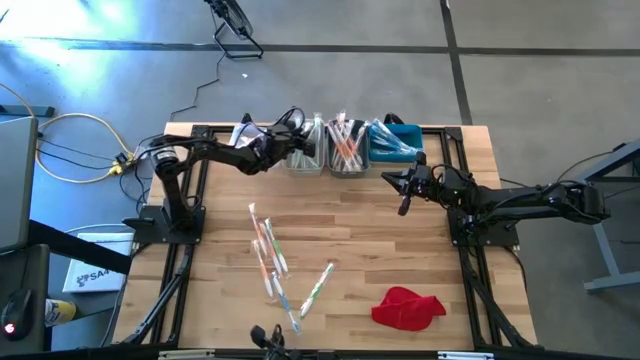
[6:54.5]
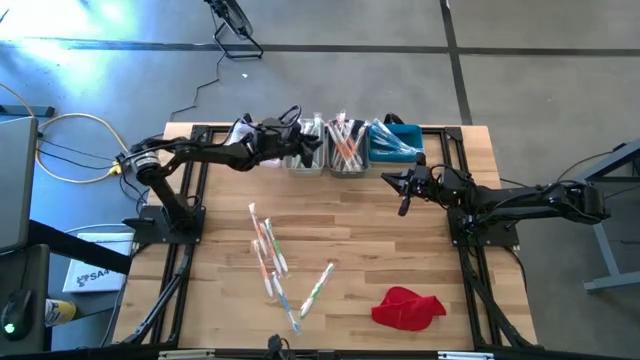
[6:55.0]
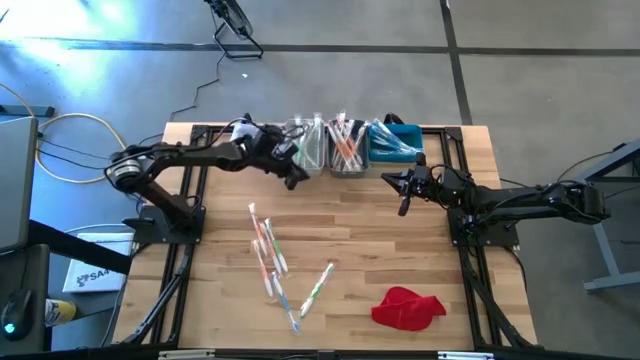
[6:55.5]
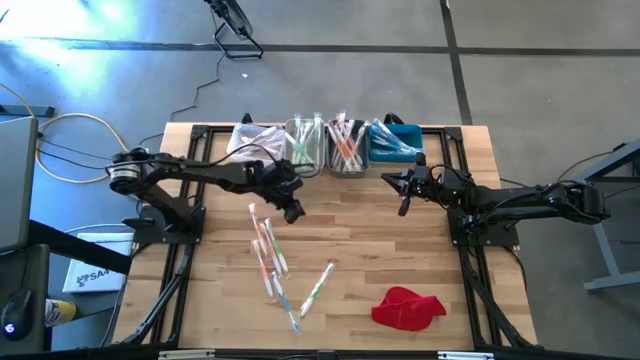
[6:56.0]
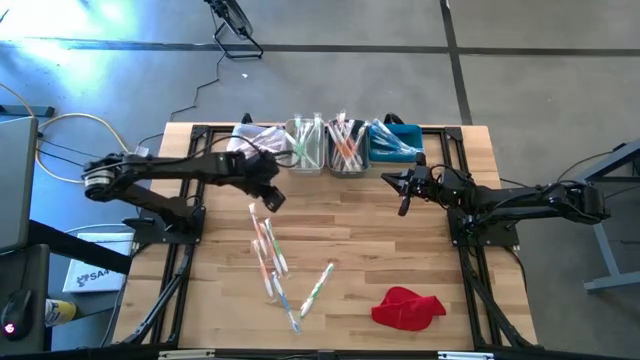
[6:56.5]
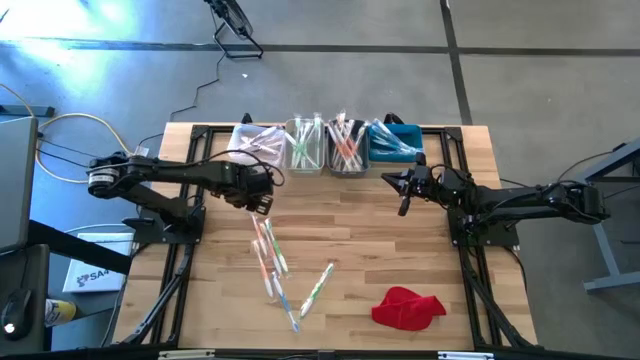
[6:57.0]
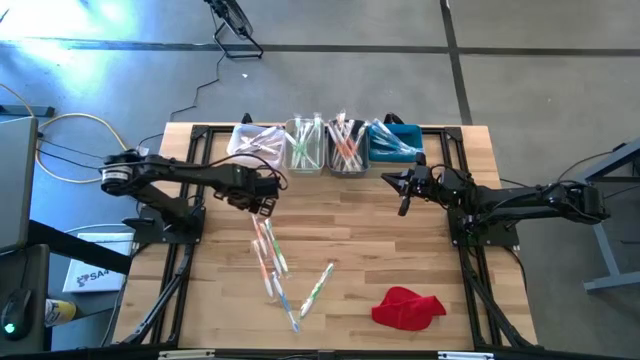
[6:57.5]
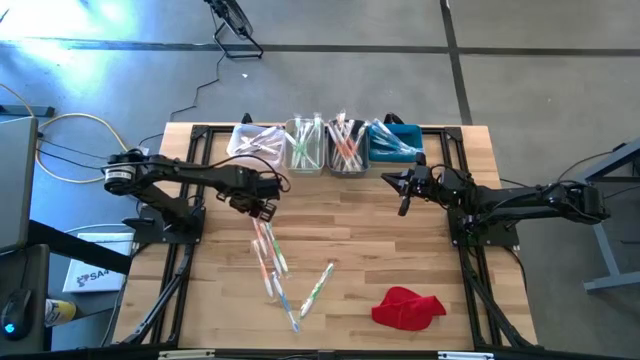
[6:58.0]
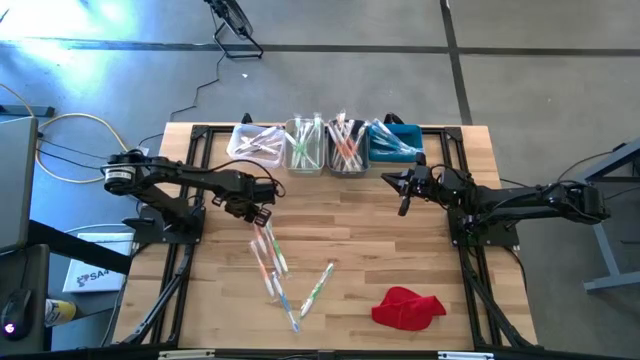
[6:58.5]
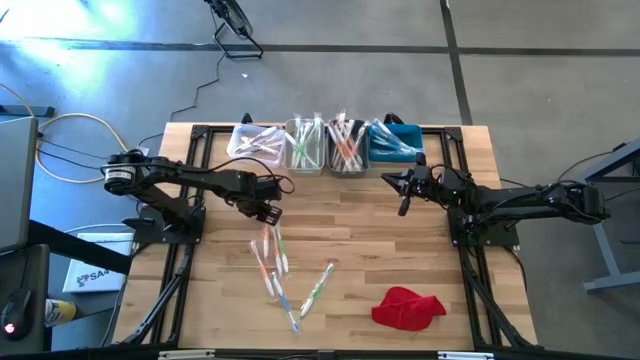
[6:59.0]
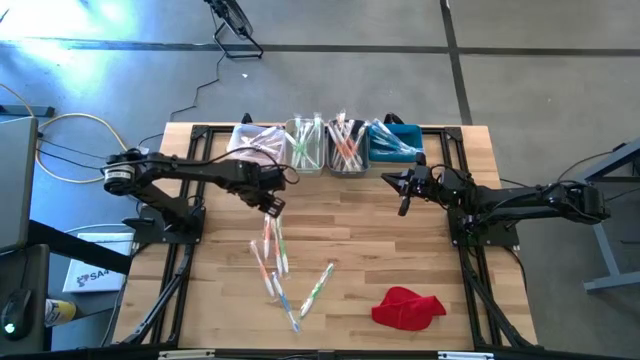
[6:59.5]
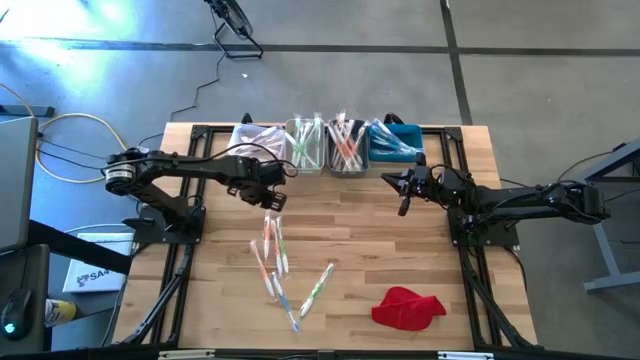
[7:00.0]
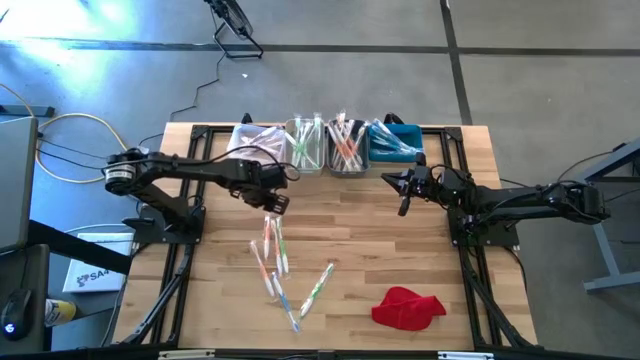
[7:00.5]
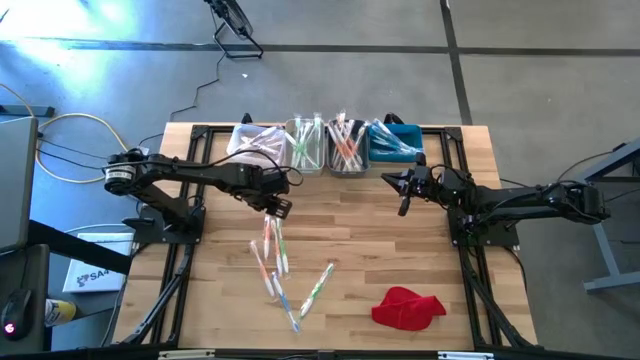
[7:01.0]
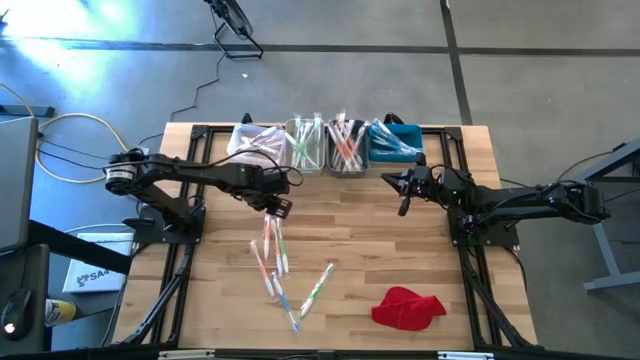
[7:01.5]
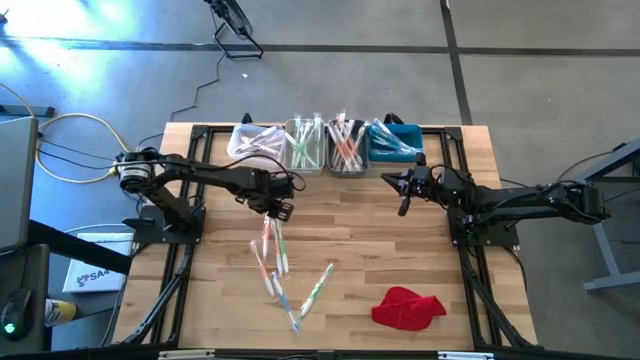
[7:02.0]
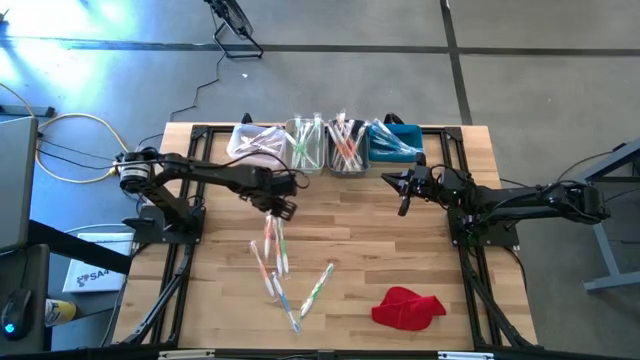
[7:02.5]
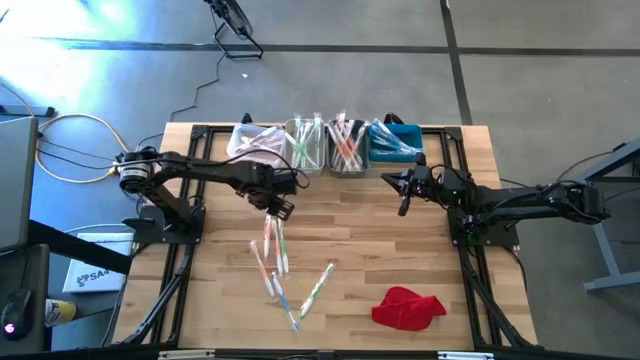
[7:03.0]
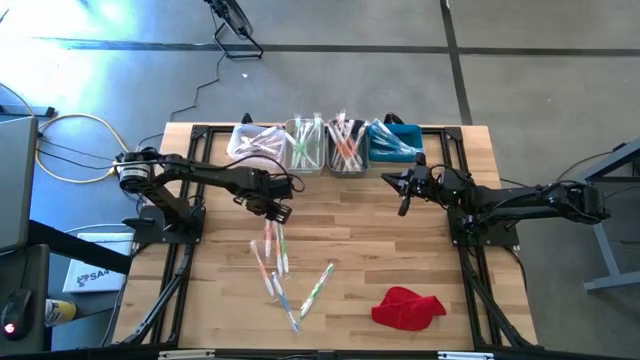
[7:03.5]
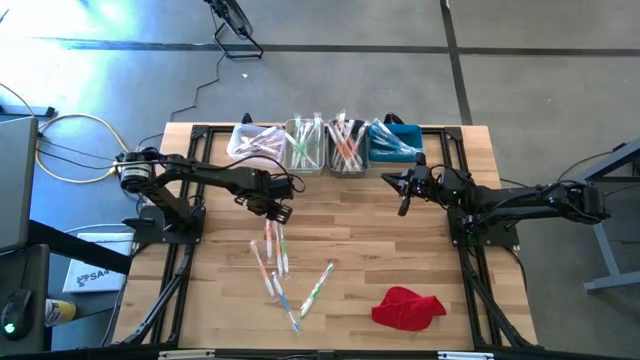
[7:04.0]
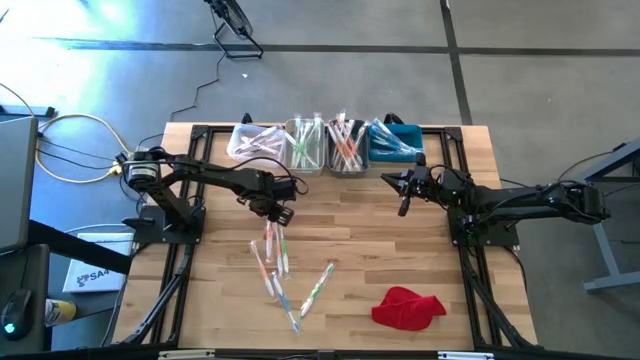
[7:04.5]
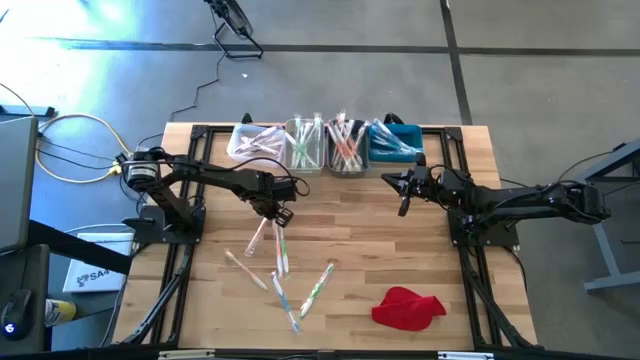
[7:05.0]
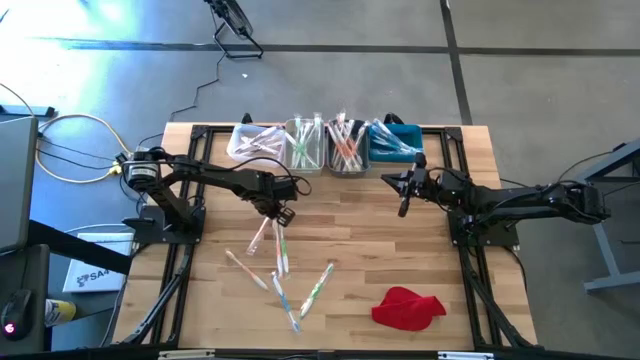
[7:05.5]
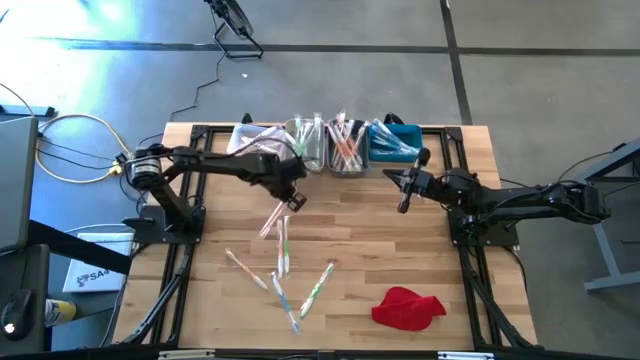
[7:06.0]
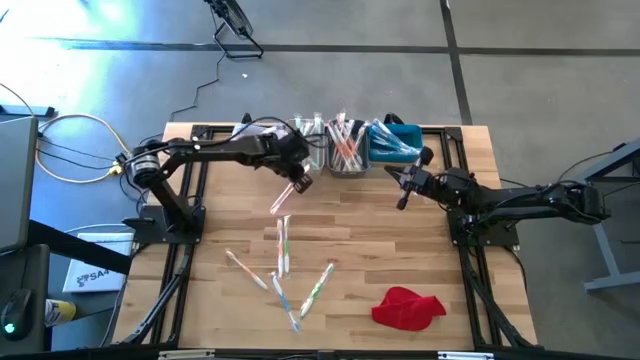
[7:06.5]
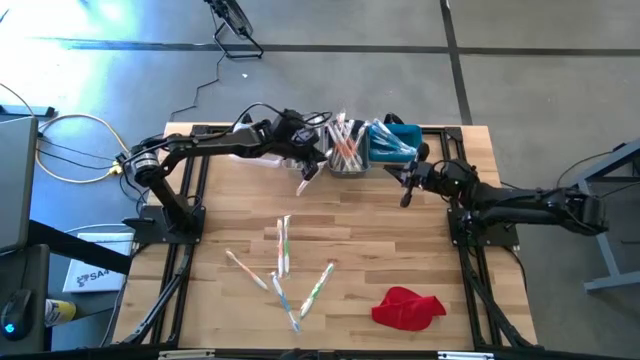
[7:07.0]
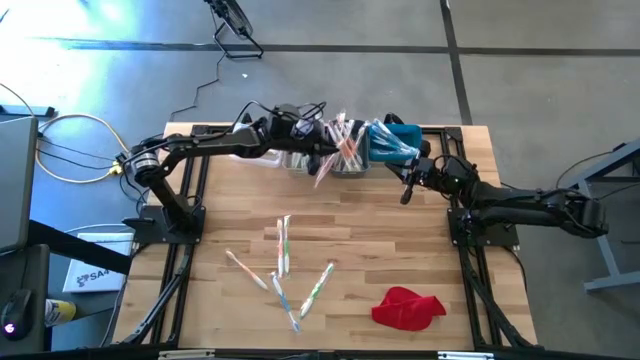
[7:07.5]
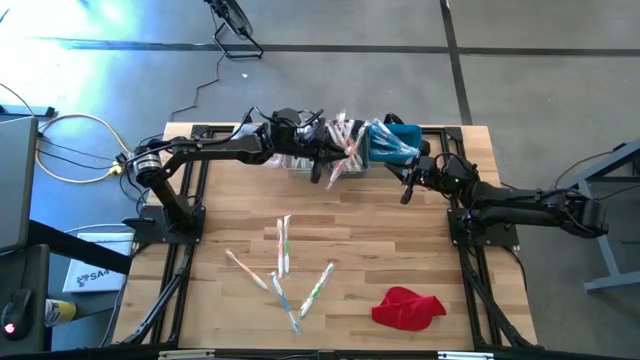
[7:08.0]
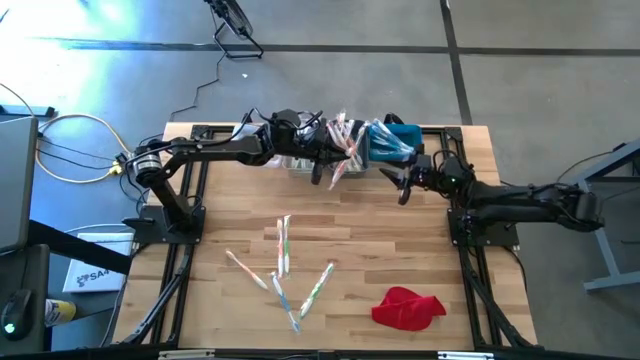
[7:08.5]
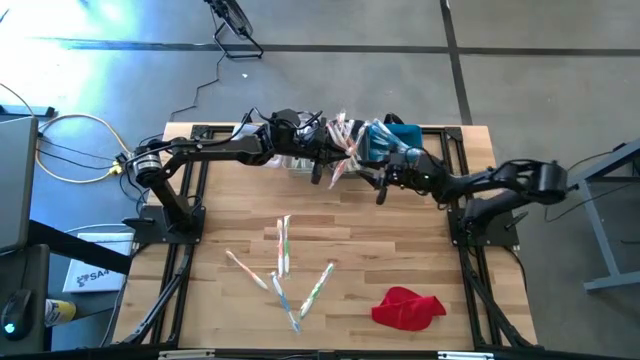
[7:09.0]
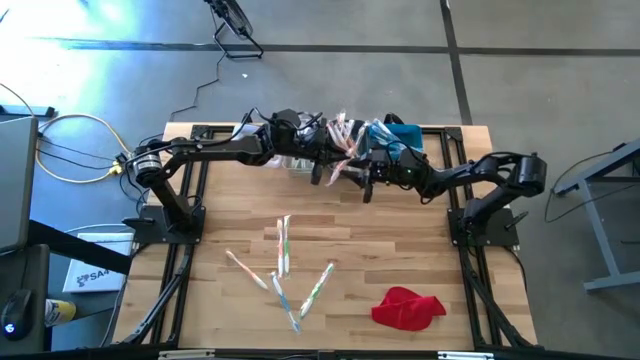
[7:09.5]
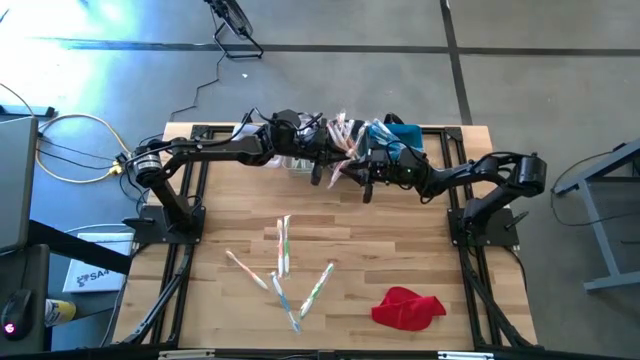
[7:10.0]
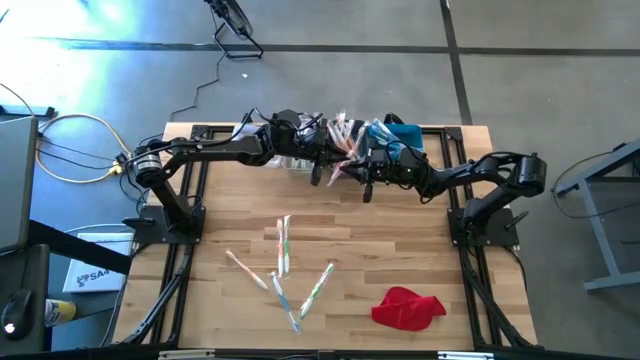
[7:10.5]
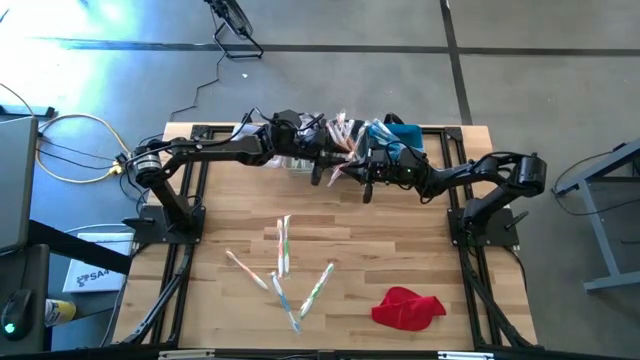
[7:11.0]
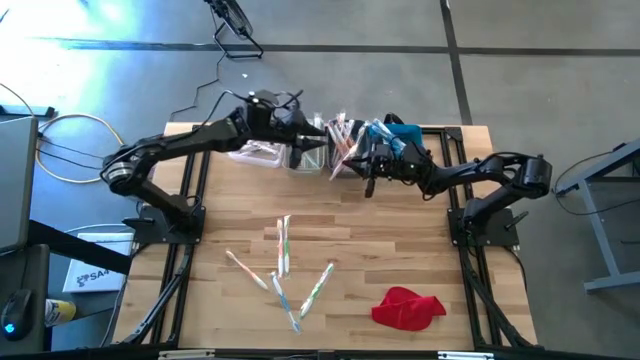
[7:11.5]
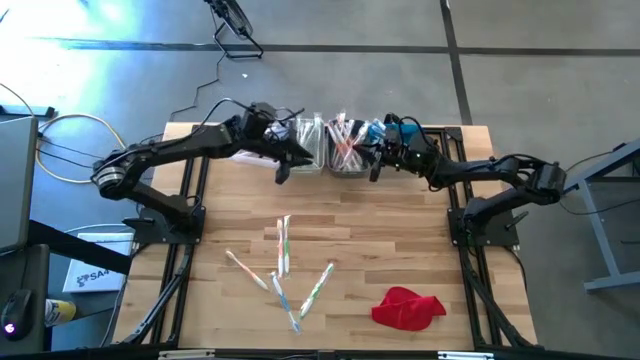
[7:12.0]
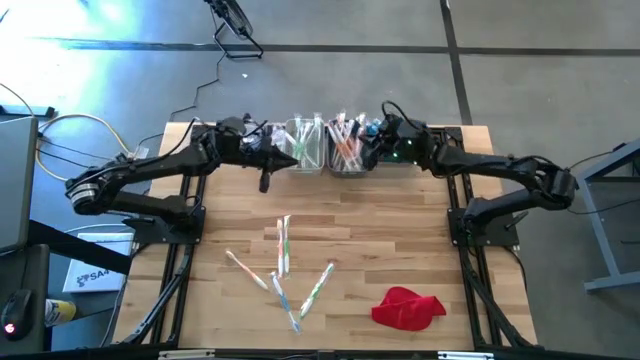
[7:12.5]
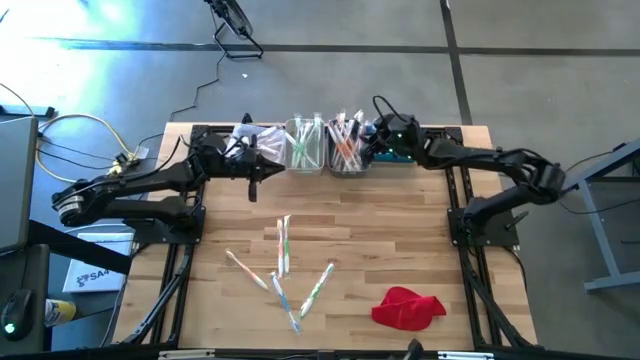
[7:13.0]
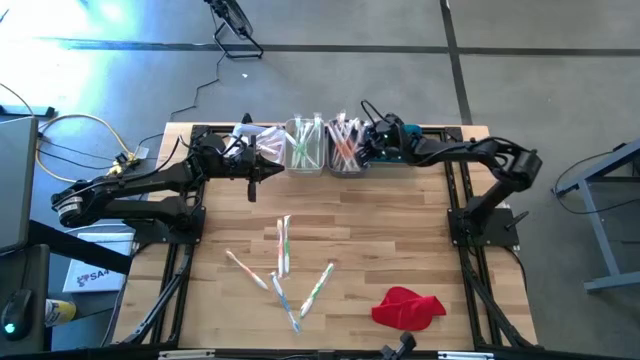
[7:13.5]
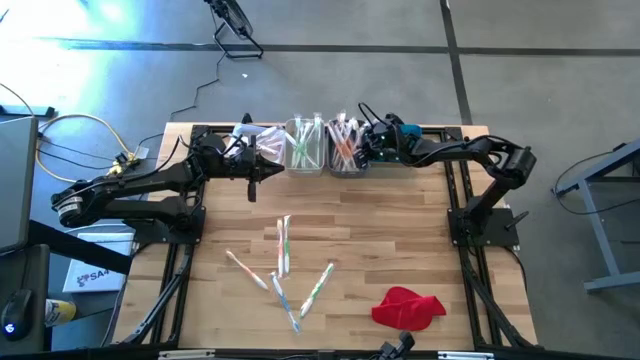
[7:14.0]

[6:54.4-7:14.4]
Task: Pick & Place Toothbrushes
Put the orange toothbrush into the dark green bin

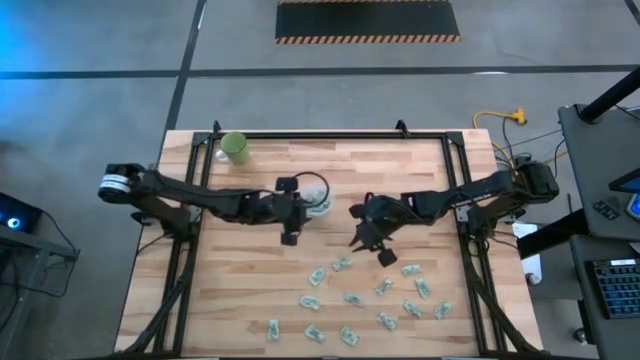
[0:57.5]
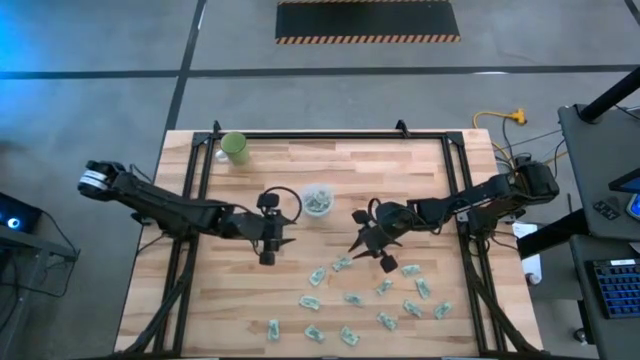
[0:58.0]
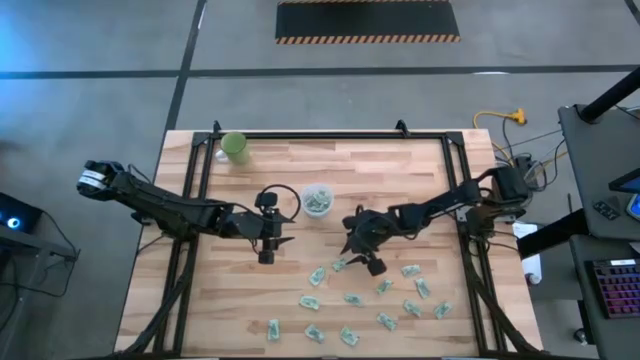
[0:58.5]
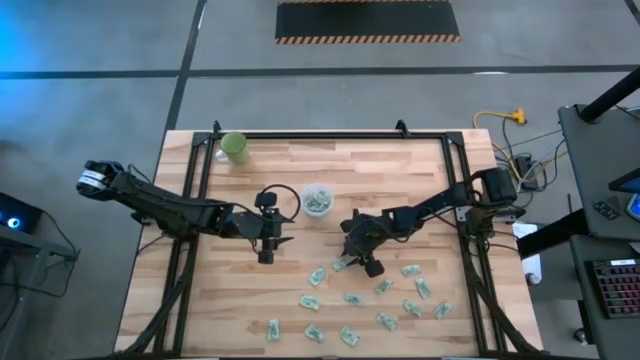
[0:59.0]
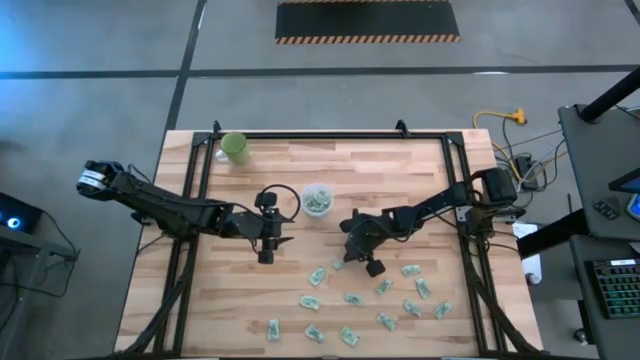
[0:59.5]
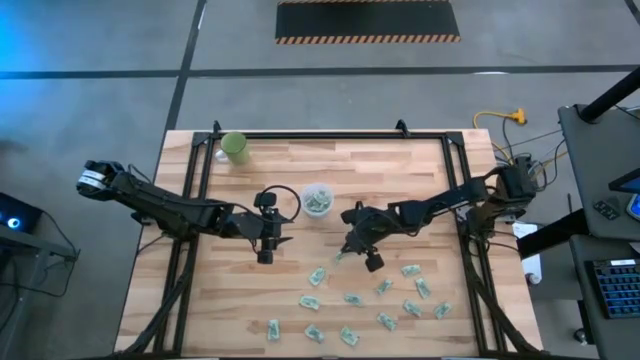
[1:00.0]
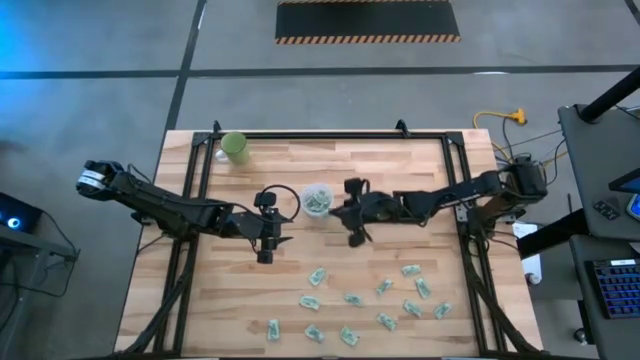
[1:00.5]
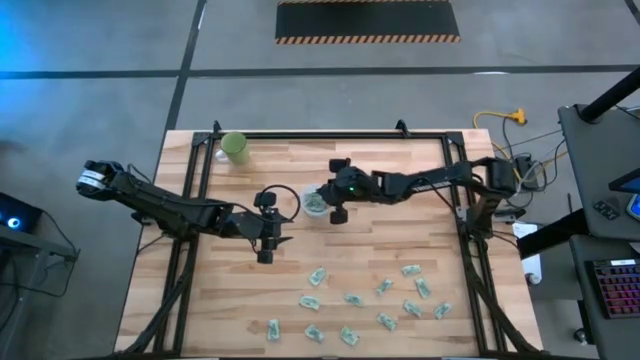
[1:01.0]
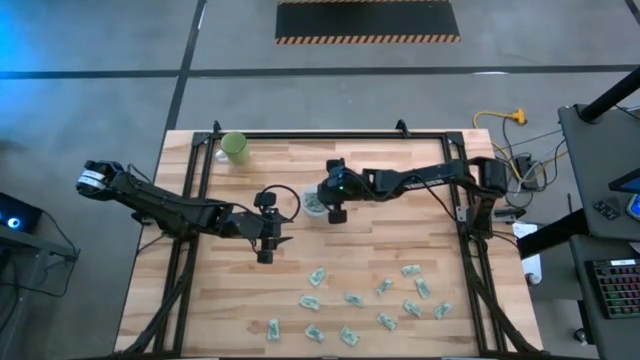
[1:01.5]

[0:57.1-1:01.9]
Task: Pick and place Stevia / Truvia into bins
Put the green stevia packet into the transparent container
